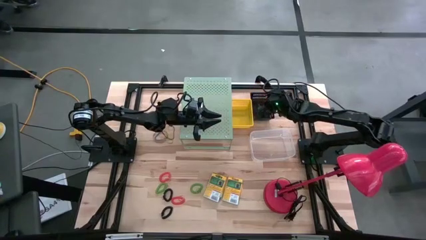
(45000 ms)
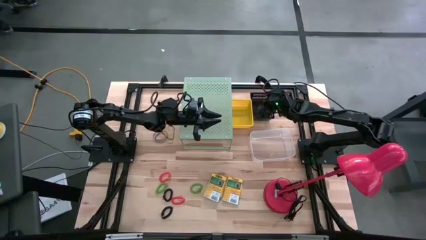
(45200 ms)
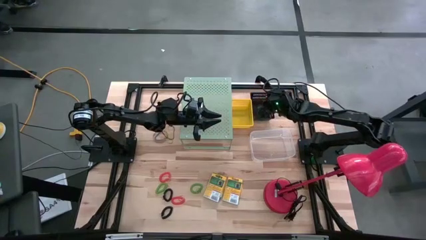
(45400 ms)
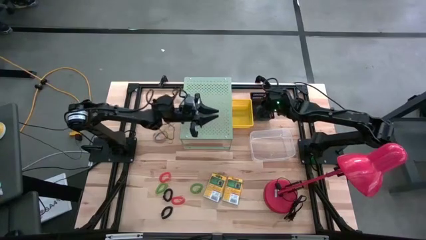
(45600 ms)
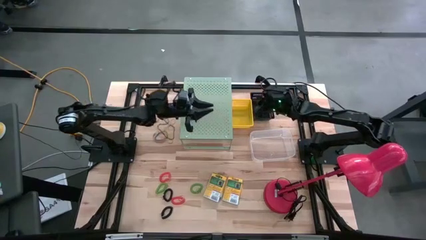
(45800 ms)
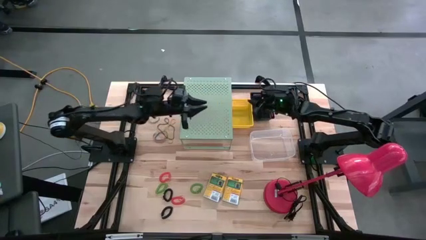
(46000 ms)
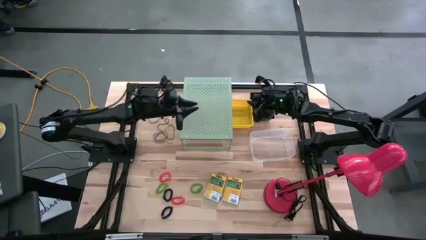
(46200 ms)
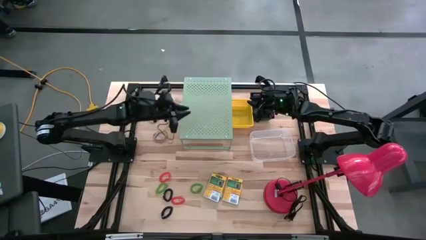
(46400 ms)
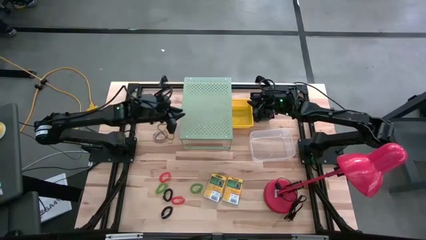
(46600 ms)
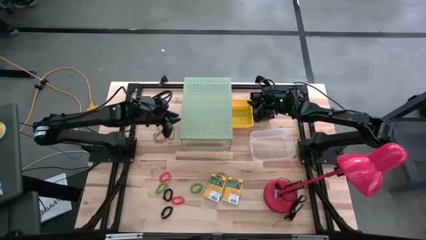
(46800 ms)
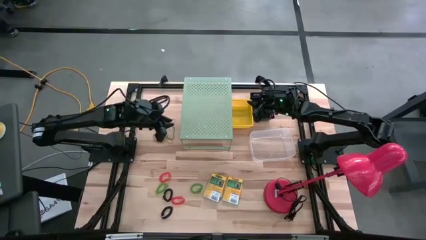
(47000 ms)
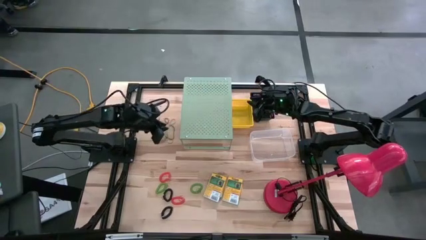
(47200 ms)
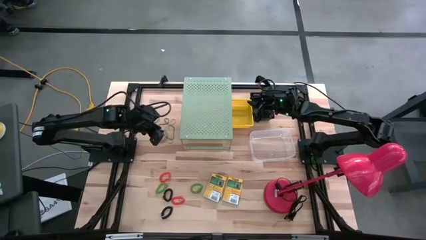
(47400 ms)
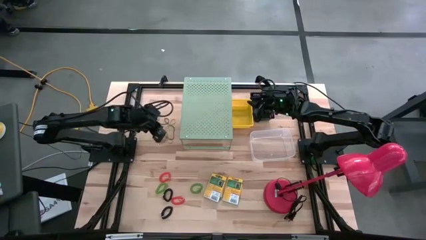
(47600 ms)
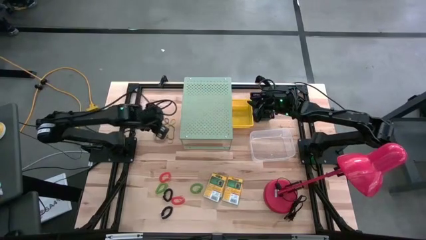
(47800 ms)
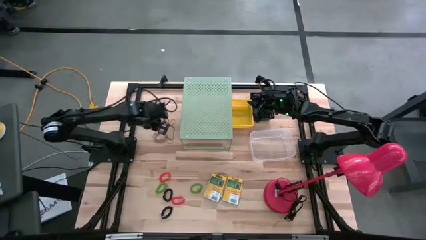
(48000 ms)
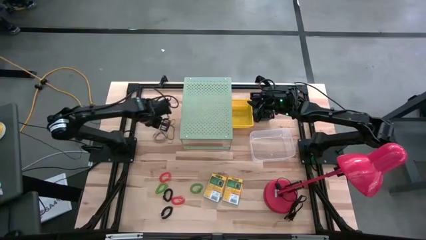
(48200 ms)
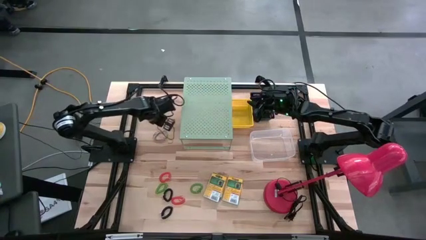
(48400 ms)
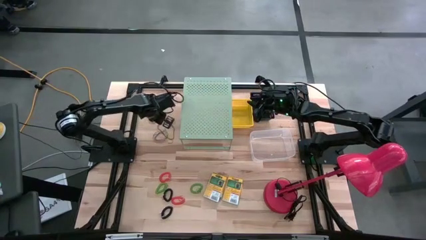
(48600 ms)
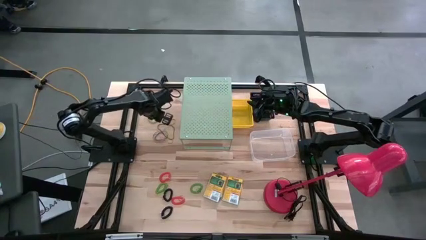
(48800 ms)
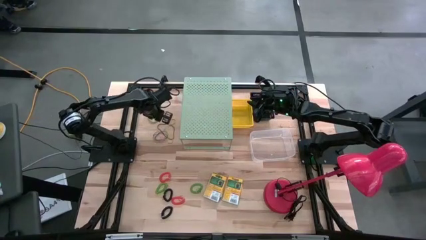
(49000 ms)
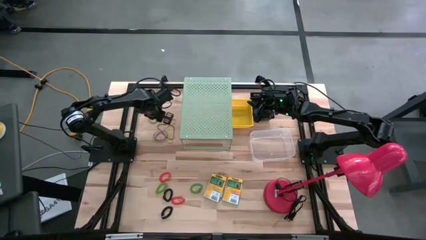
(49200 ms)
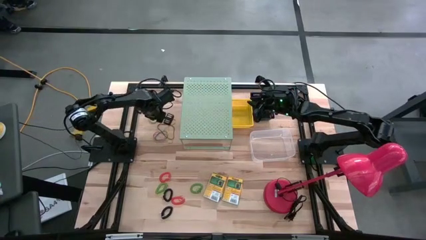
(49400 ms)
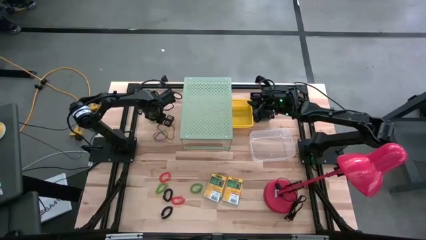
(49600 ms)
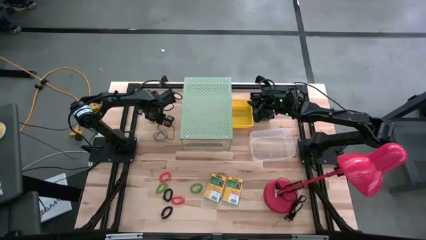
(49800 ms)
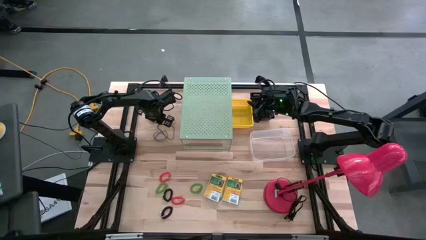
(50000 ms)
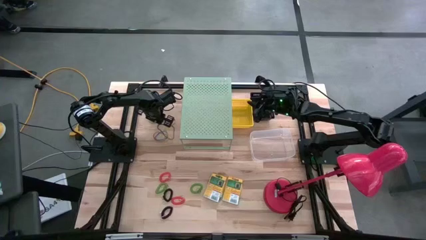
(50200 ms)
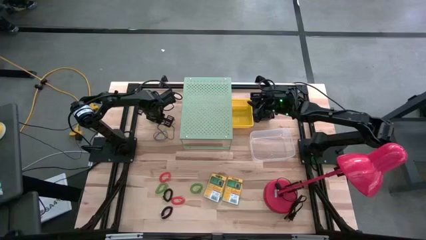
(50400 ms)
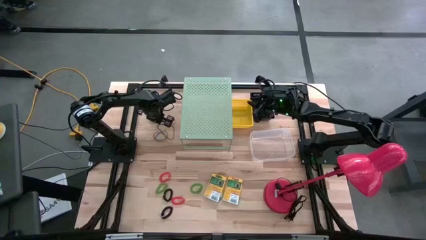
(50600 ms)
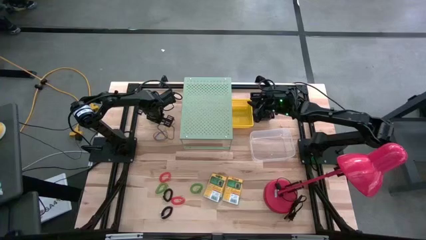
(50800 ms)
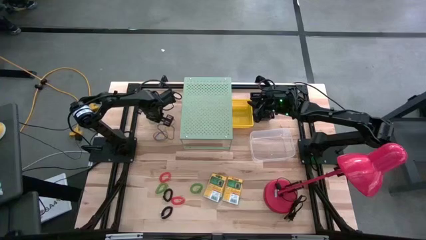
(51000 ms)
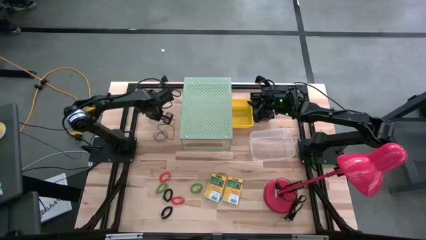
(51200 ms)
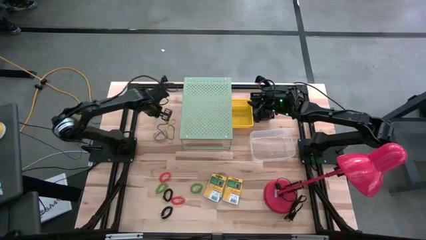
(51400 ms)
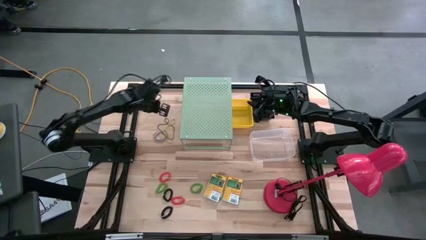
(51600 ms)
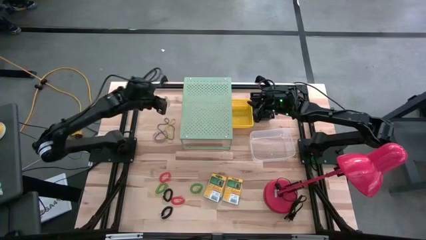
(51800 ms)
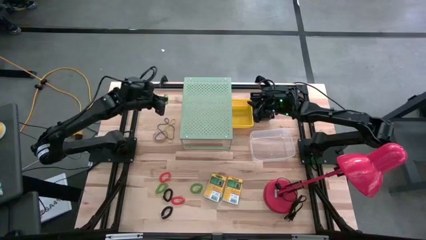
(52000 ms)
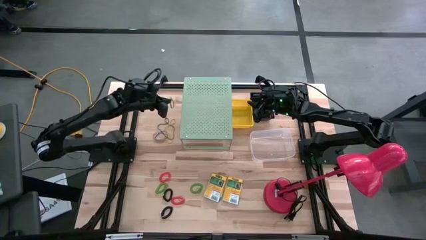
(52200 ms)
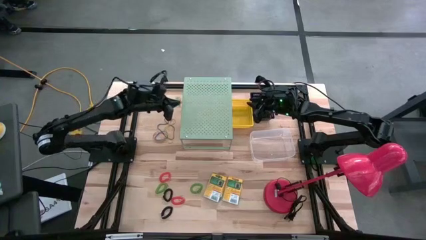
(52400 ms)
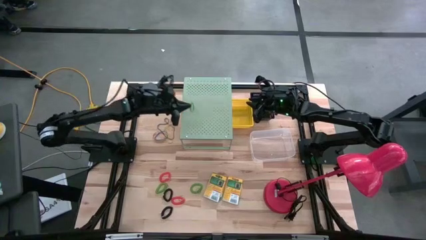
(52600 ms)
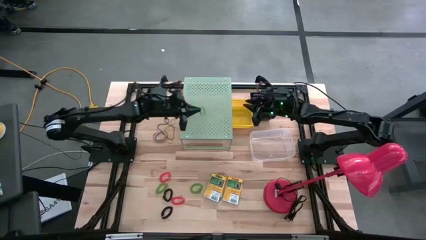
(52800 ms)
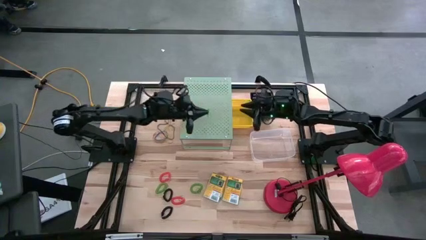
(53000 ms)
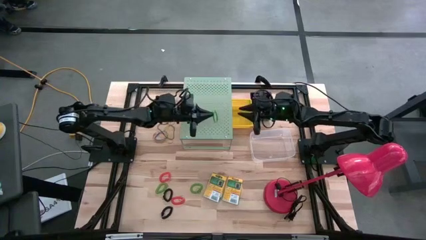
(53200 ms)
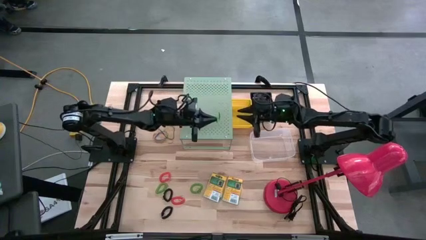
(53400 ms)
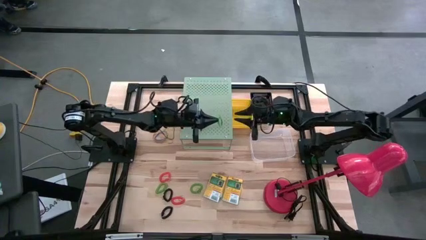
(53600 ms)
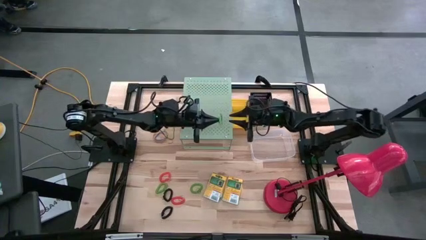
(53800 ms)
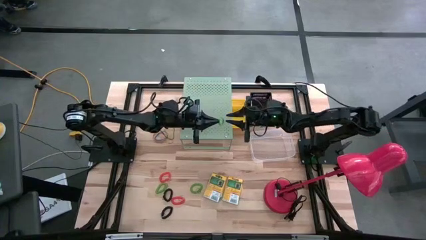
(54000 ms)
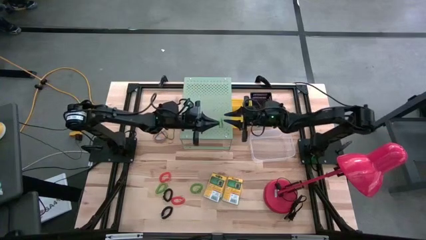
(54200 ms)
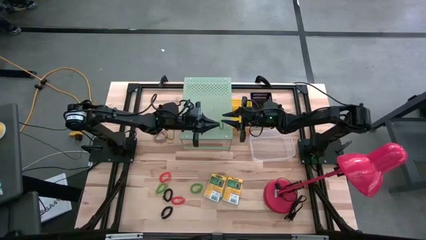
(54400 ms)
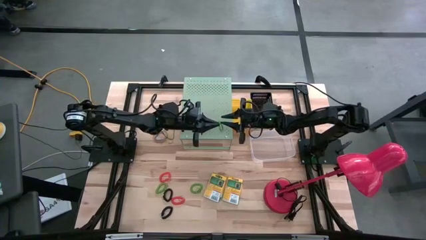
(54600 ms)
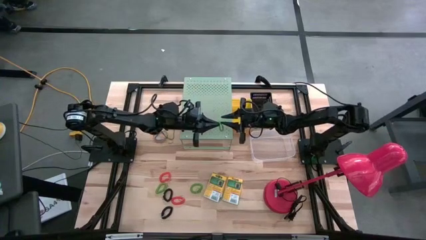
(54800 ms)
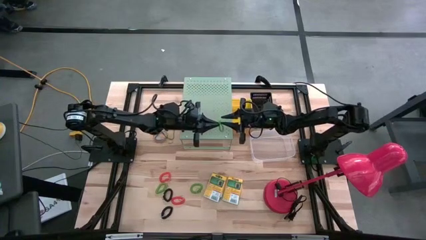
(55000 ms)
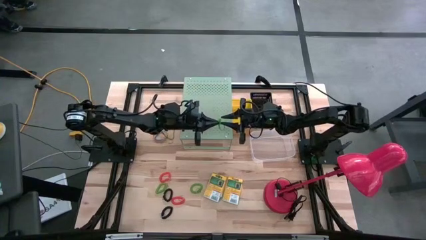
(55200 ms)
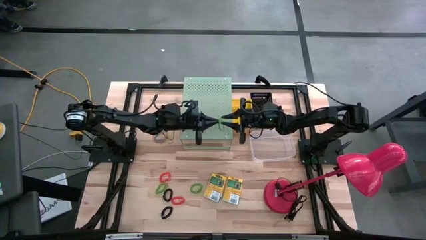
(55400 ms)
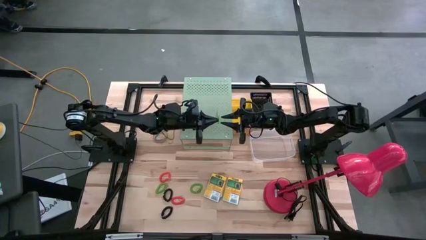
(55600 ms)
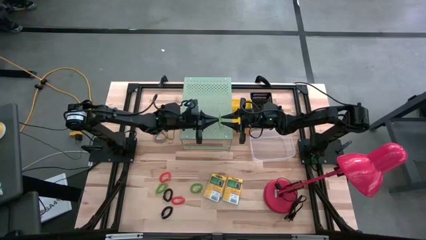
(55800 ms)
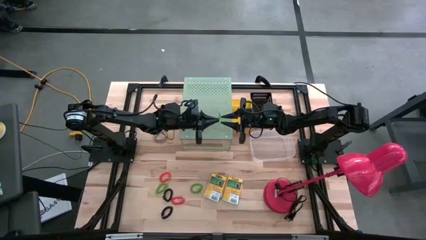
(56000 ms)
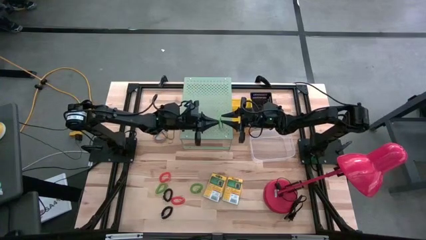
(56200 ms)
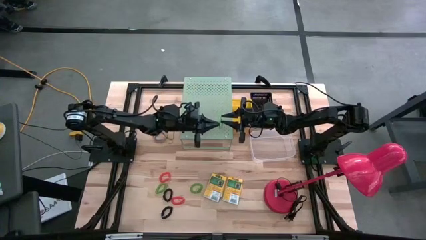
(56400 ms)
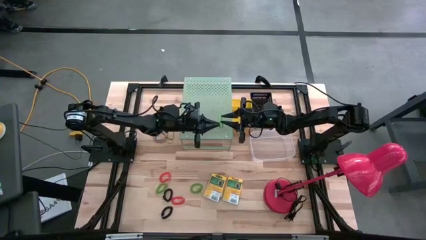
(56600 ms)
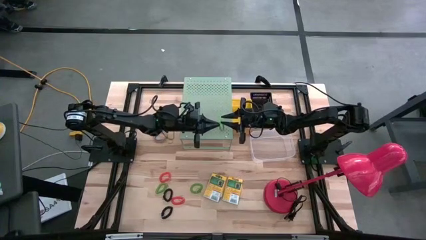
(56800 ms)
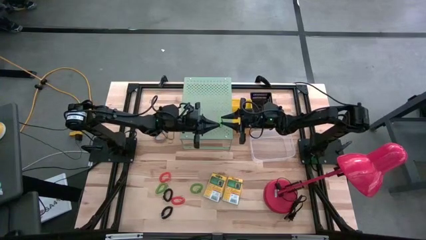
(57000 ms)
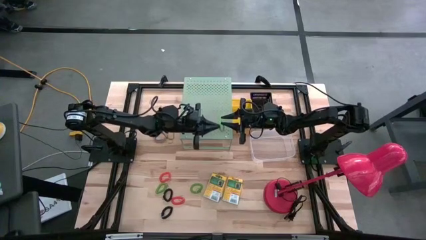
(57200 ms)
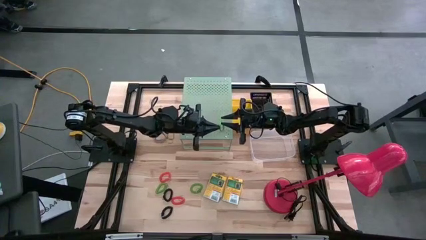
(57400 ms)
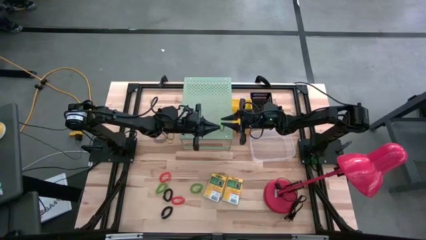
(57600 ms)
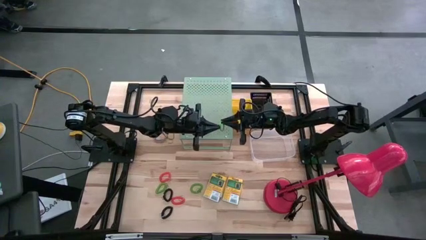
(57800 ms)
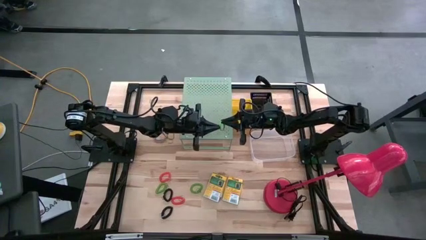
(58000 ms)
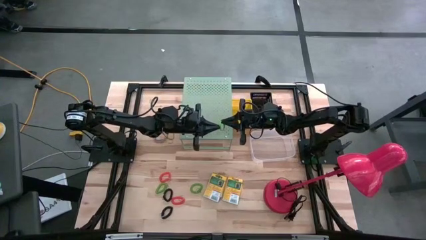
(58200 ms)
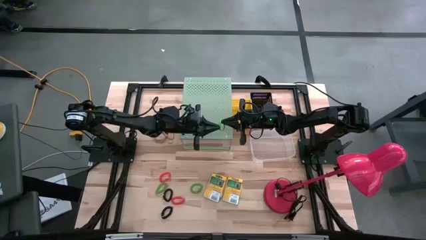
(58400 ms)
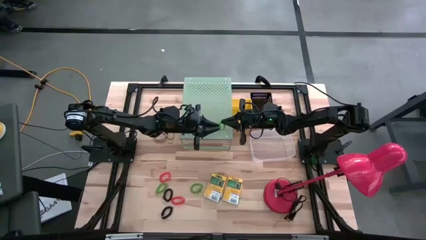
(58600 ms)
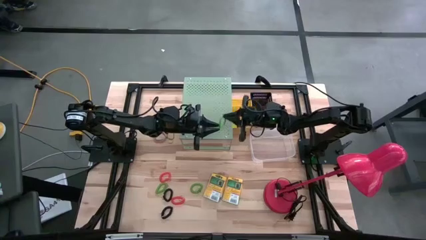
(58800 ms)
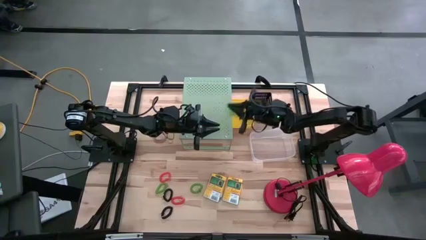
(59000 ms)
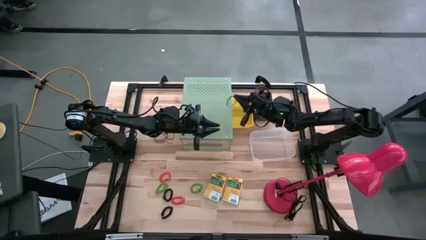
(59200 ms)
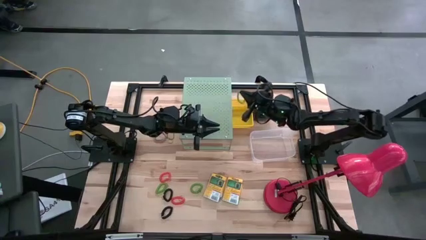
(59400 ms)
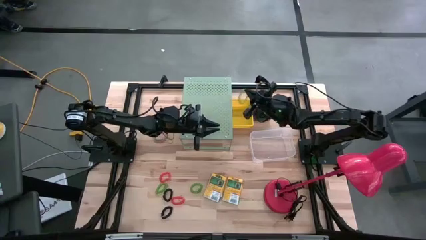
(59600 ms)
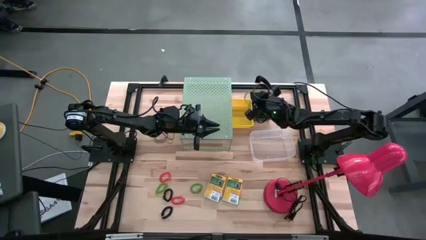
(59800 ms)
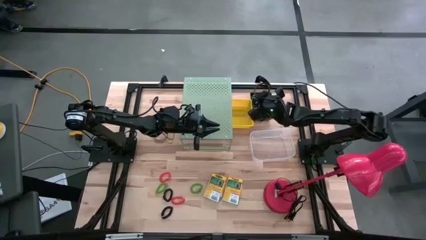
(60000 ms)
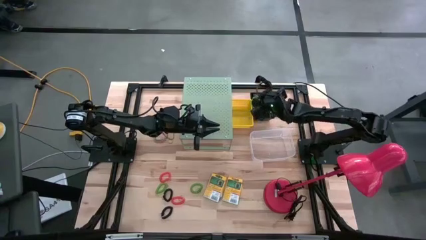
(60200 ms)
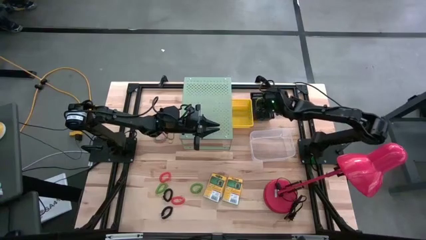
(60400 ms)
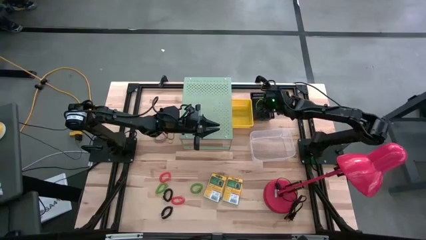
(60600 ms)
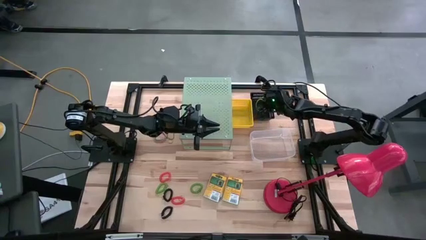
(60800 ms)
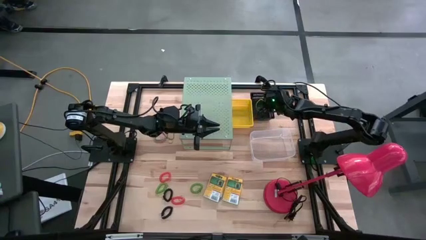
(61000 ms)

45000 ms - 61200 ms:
Task: Pick & Place Office Desk Supplies
Put the green rubber band into the black bin
